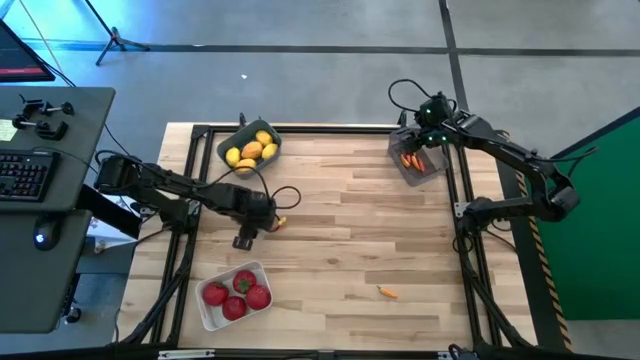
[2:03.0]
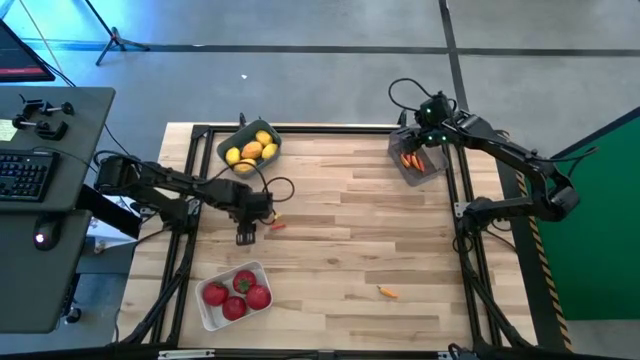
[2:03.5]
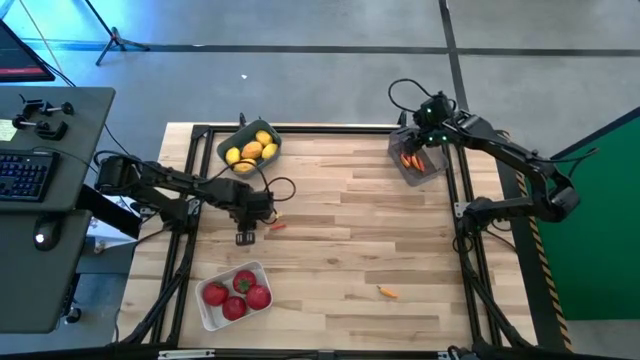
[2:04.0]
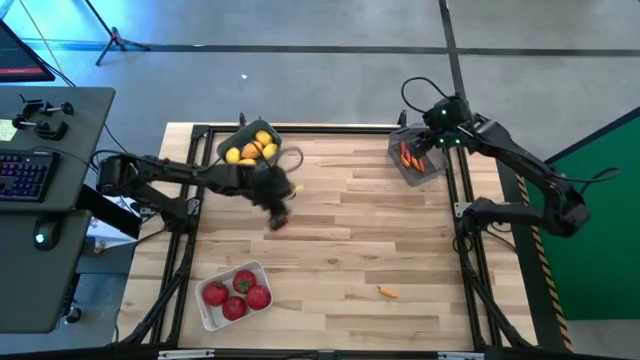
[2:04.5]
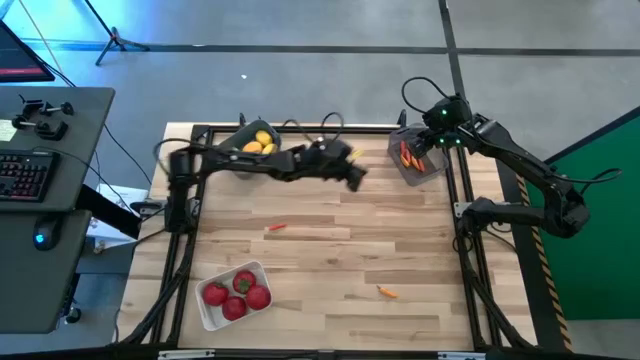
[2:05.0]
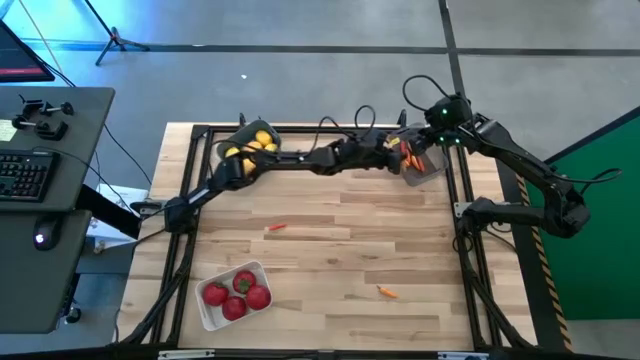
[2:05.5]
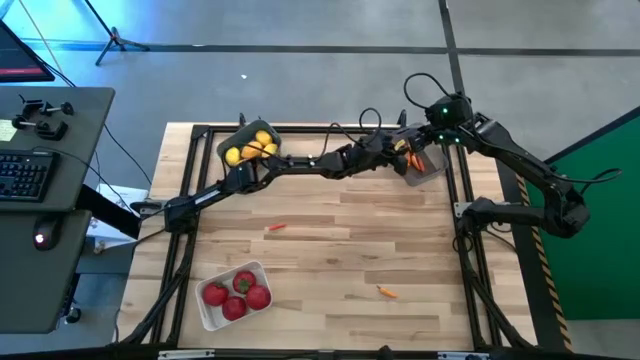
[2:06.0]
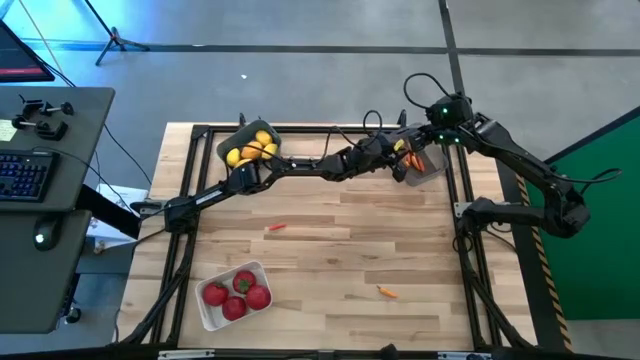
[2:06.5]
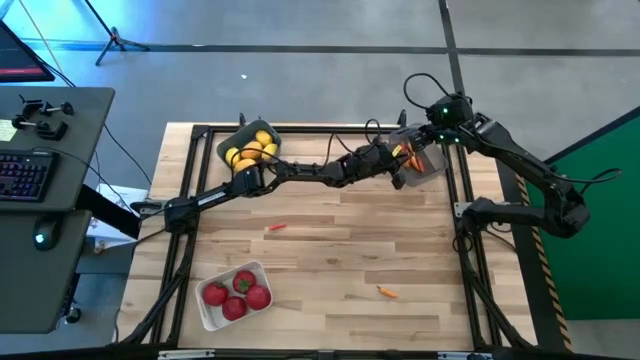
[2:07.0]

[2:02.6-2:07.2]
Task: Sort produce into baskets
Put the yellow chili pepper into the black bin

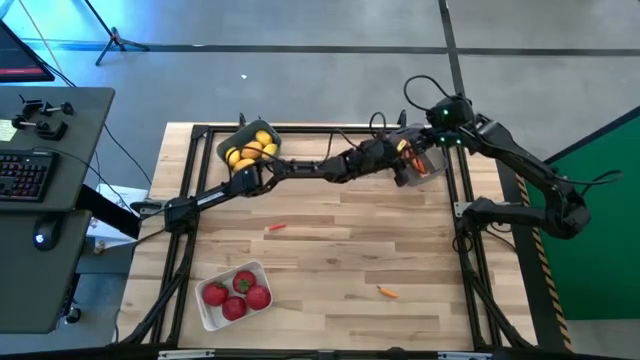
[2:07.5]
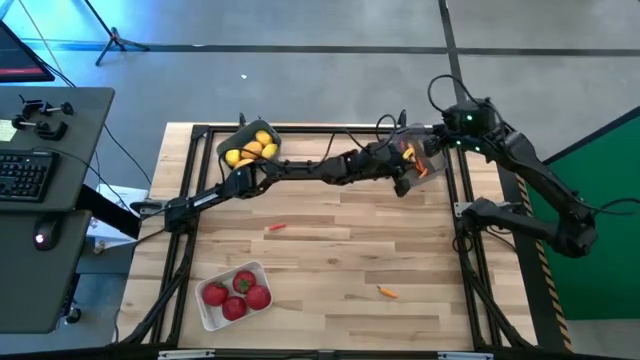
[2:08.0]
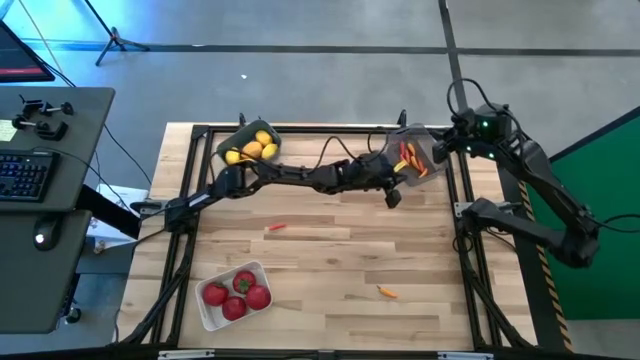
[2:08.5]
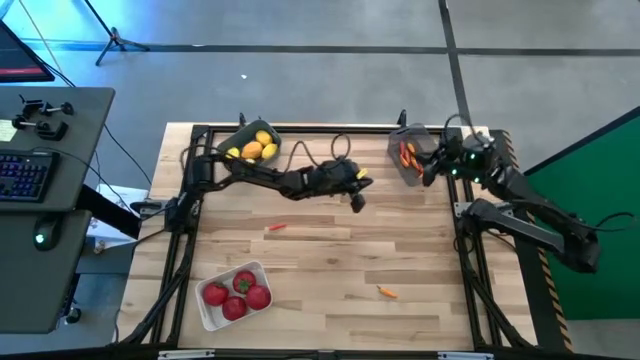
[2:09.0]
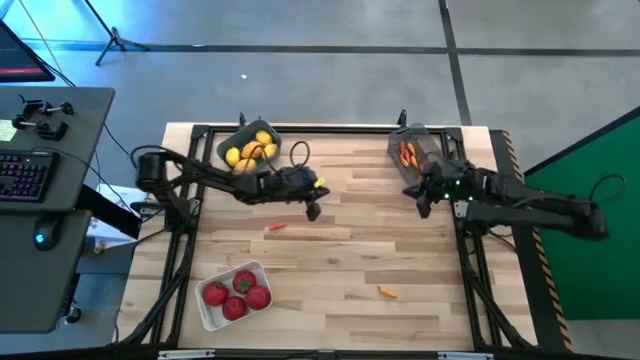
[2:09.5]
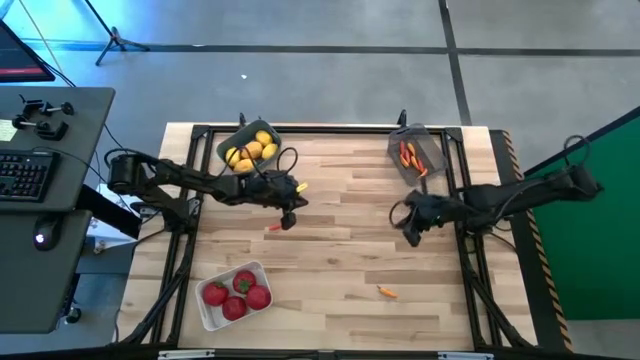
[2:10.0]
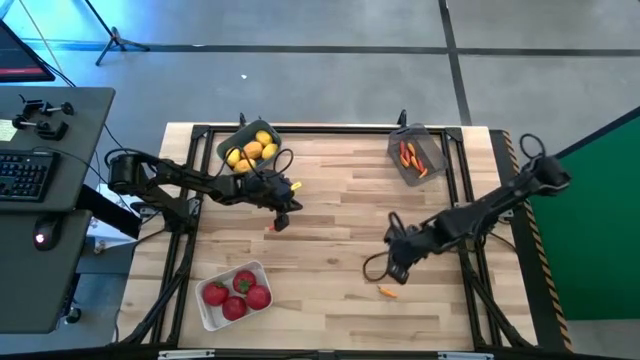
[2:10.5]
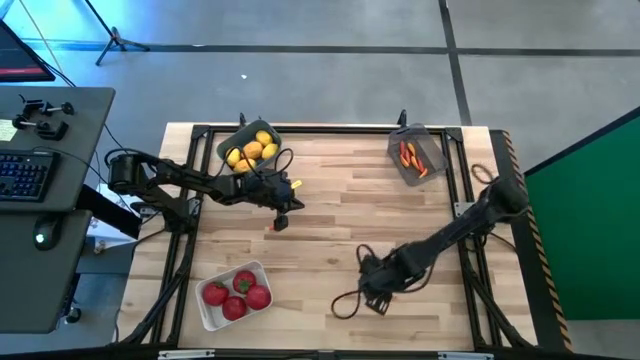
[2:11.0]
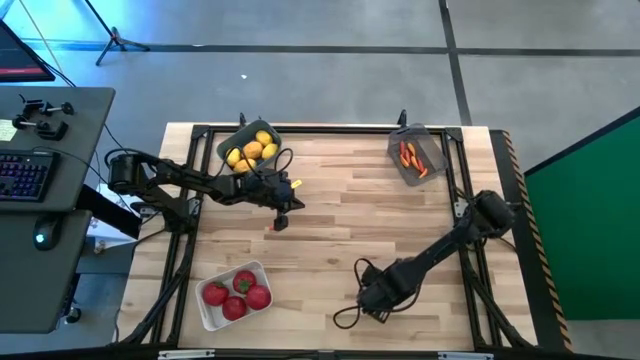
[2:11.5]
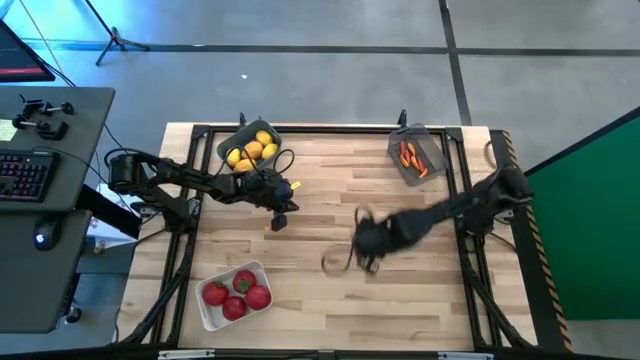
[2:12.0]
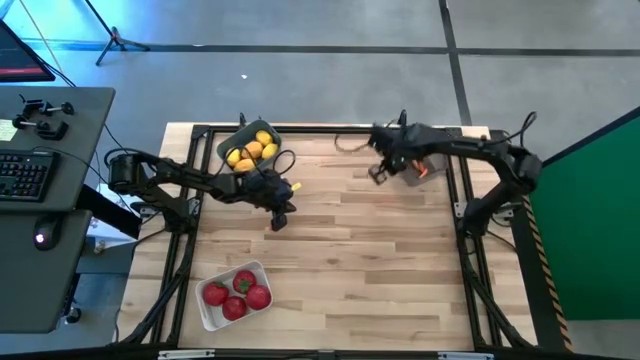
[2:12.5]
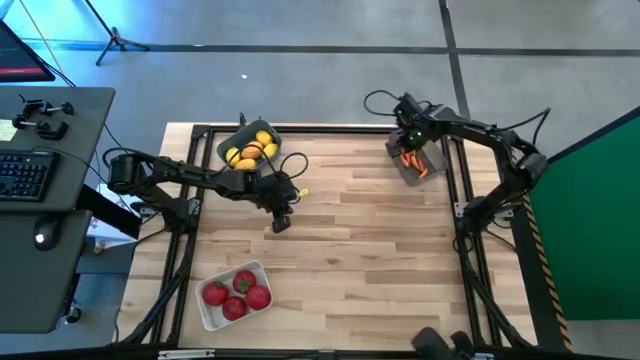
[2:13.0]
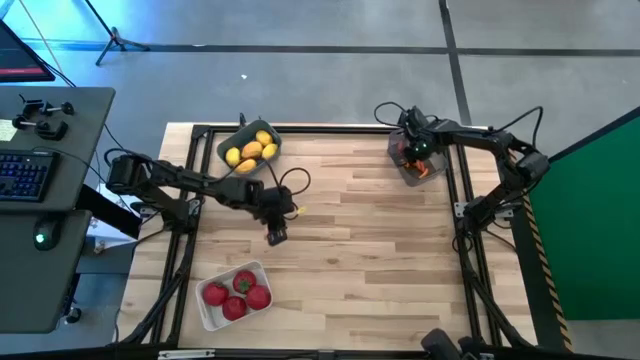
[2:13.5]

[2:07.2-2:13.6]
Put the yellow chili pepper into the black bin

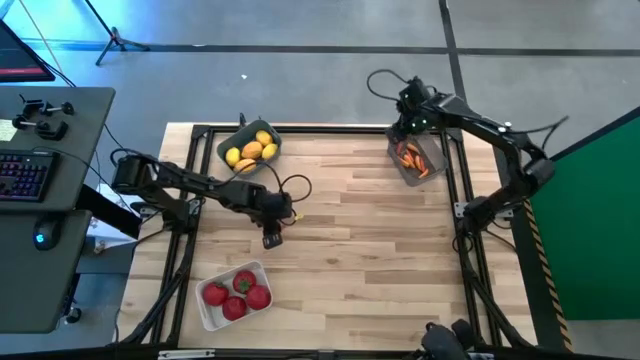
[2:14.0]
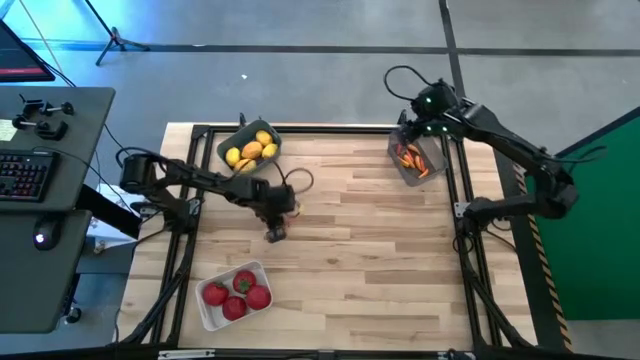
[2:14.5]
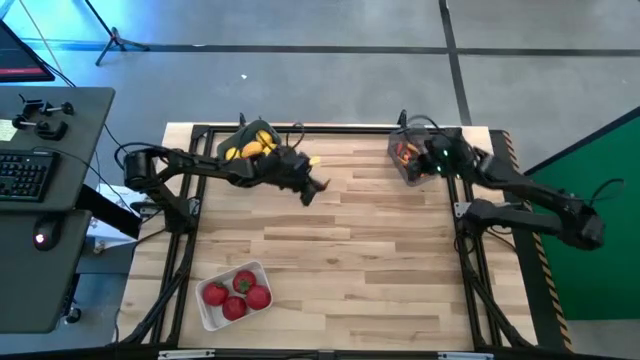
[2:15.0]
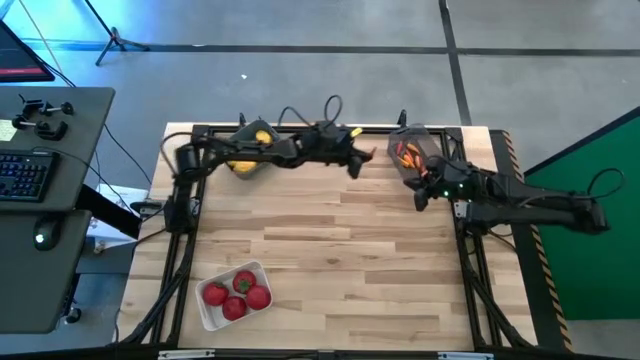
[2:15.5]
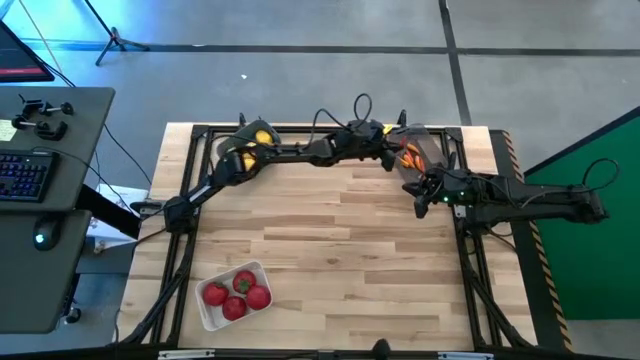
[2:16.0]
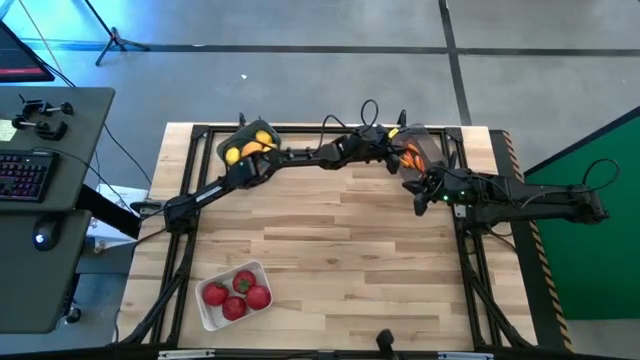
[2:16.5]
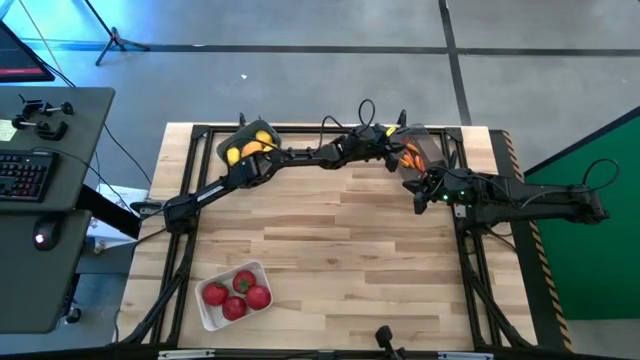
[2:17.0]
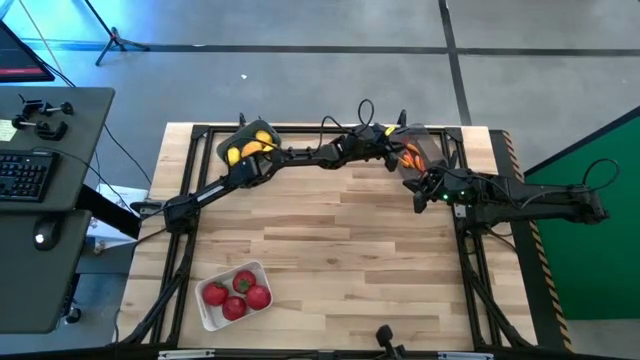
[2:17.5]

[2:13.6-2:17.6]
Put the orange chili pepper into the black bin

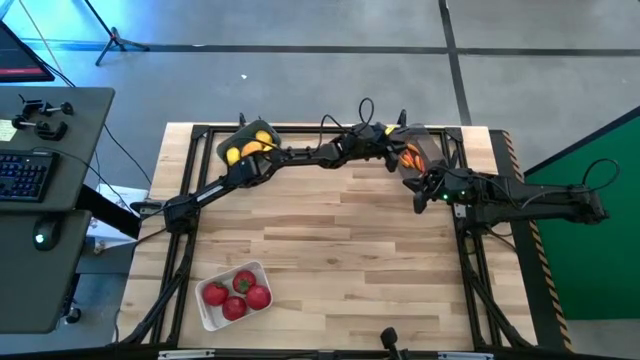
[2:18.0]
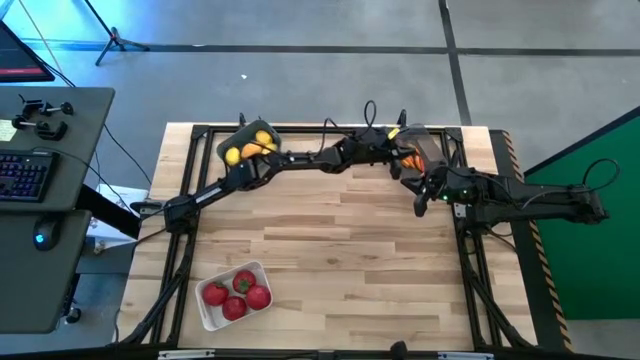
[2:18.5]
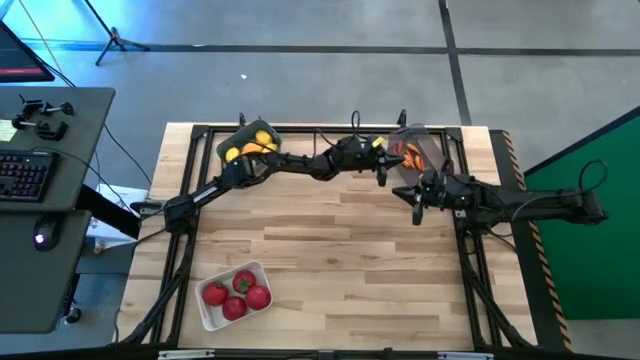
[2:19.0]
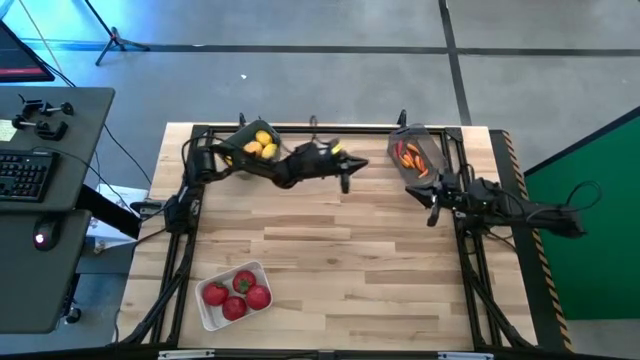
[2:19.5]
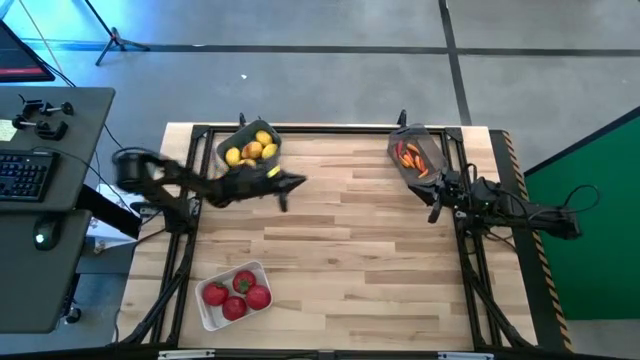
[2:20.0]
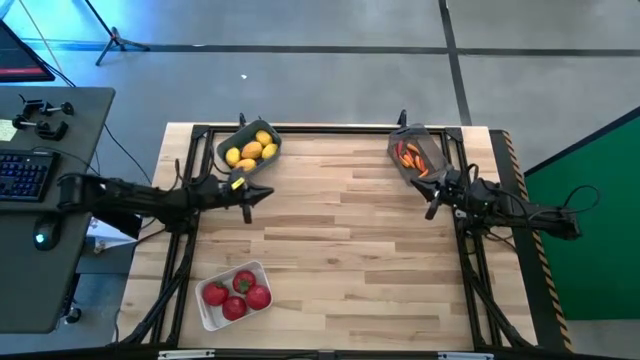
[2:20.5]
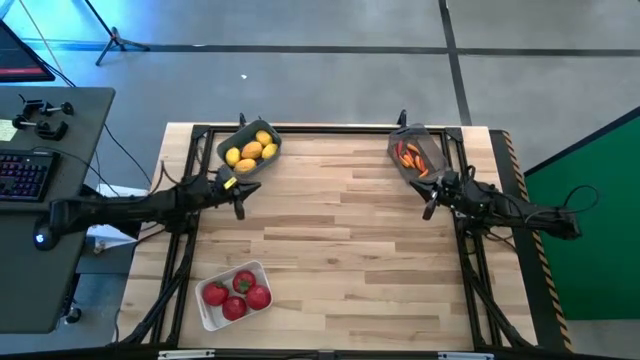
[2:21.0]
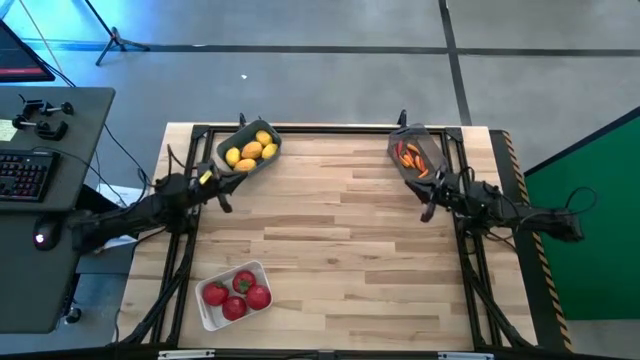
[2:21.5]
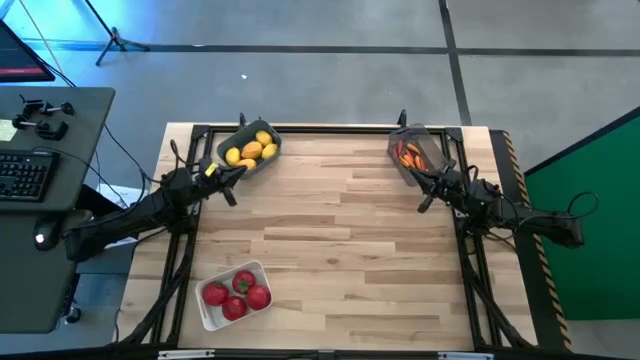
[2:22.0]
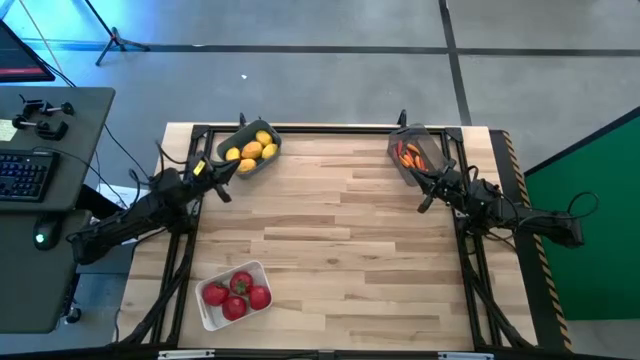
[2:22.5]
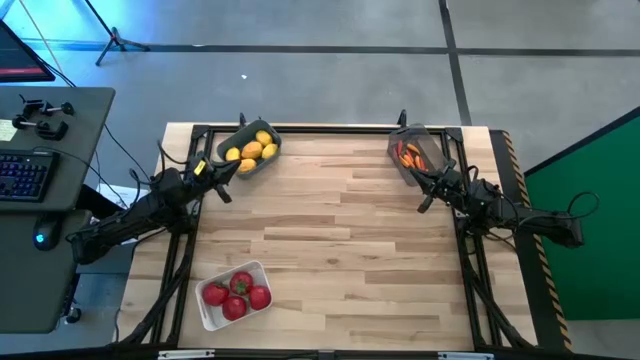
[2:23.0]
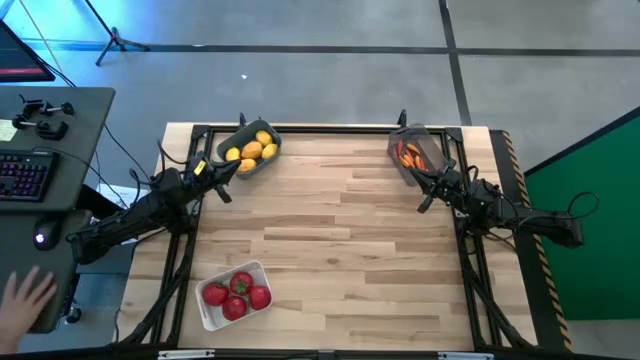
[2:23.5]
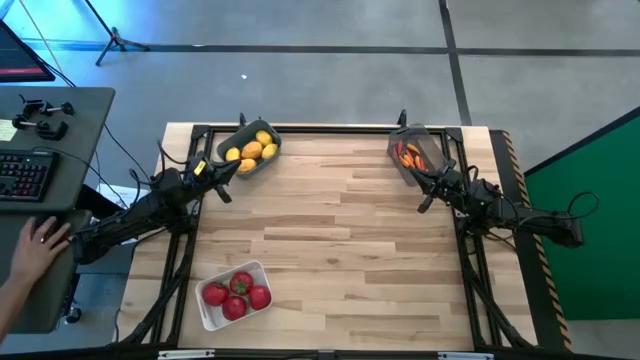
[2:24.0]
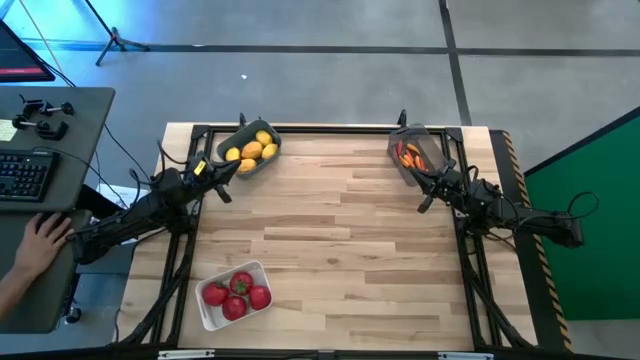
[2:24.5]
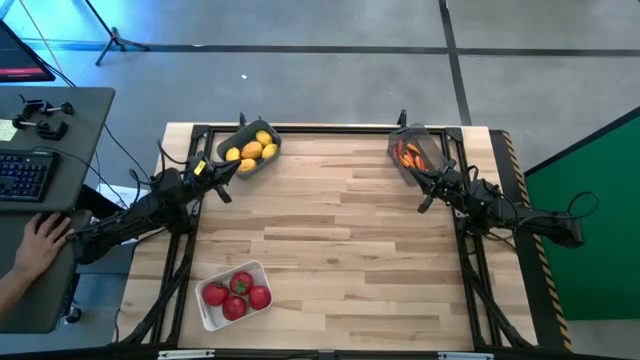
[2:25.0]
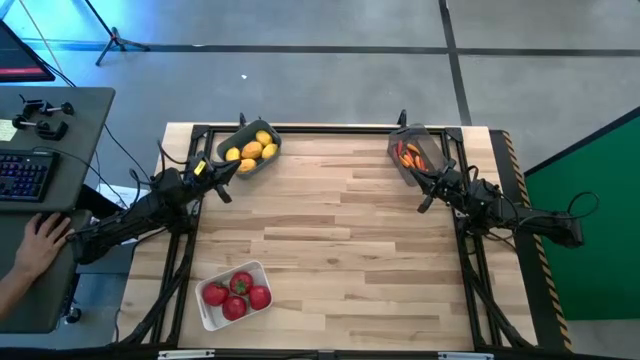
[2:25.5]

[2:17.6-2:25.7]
Return to Home Position
